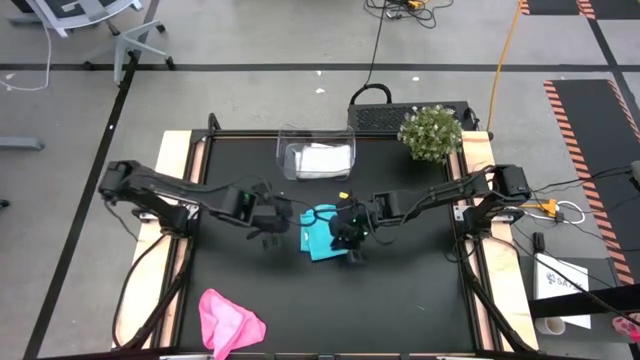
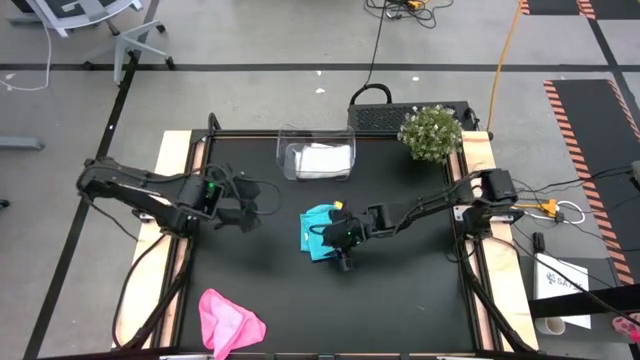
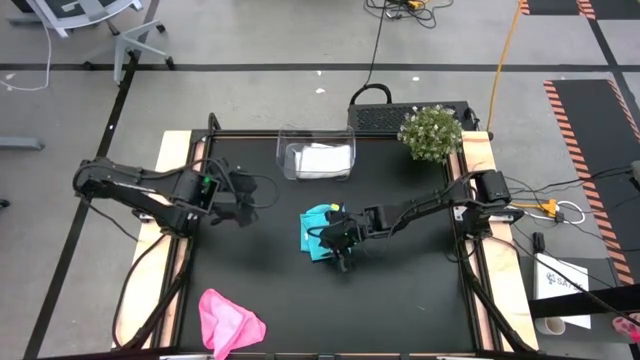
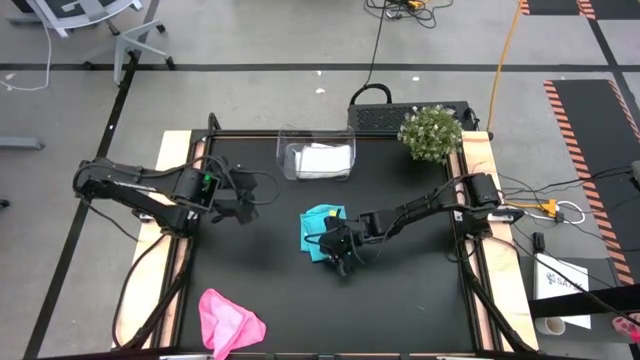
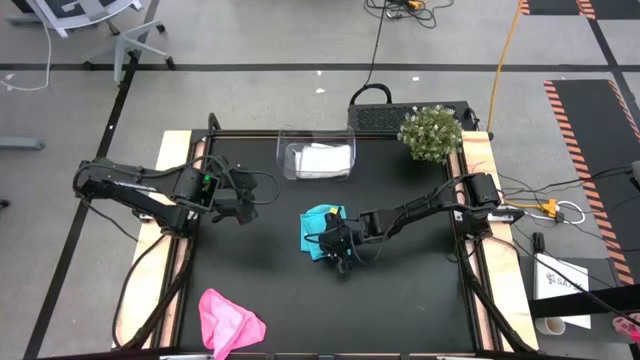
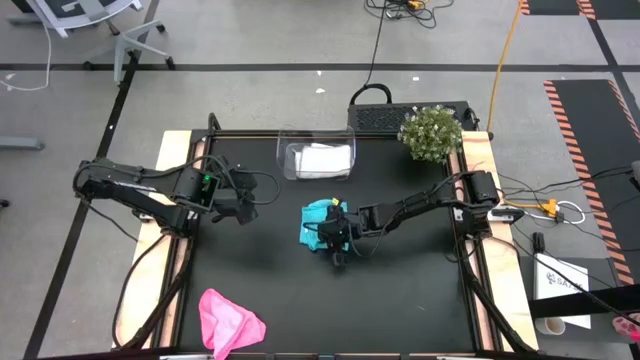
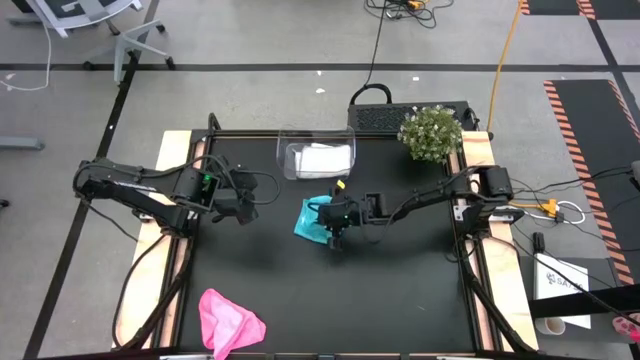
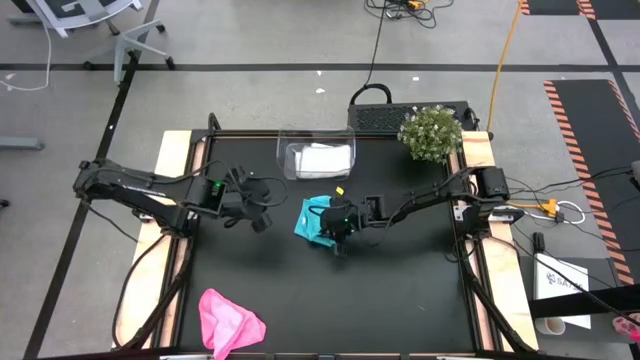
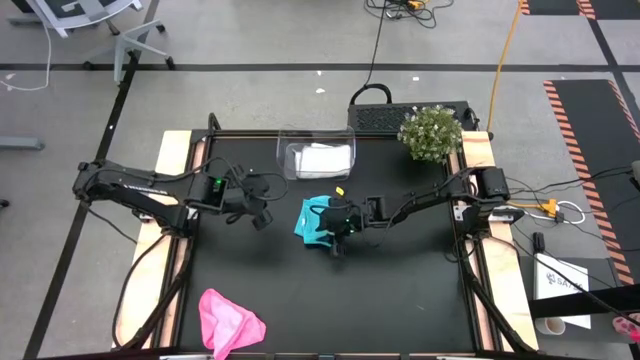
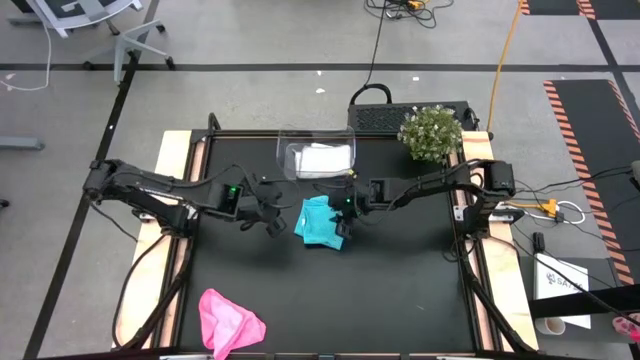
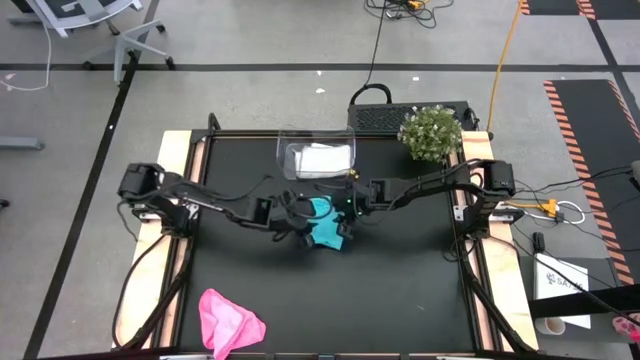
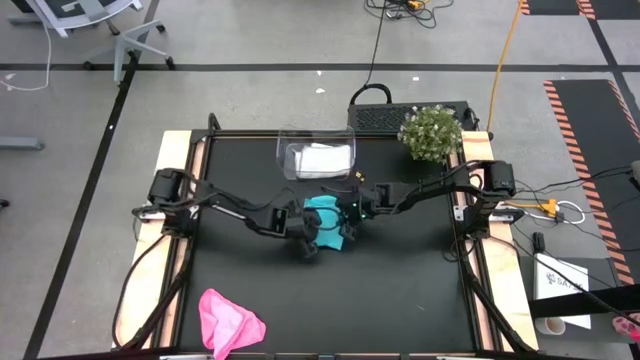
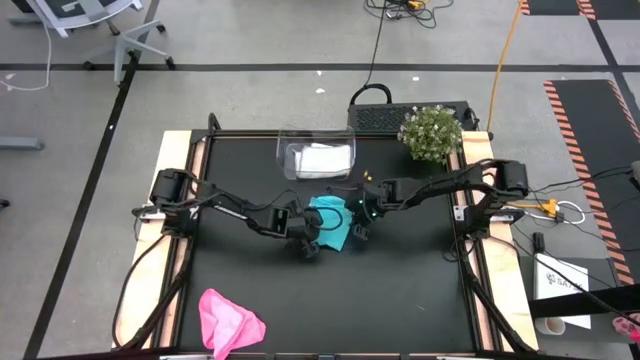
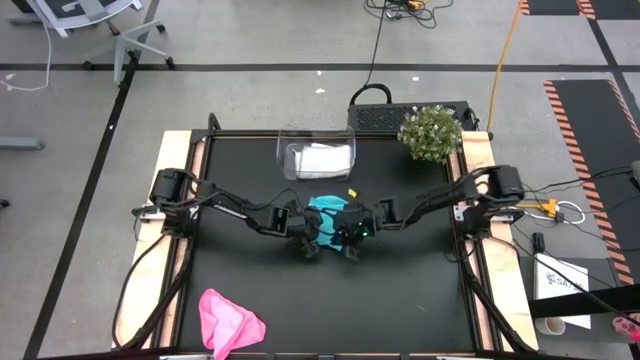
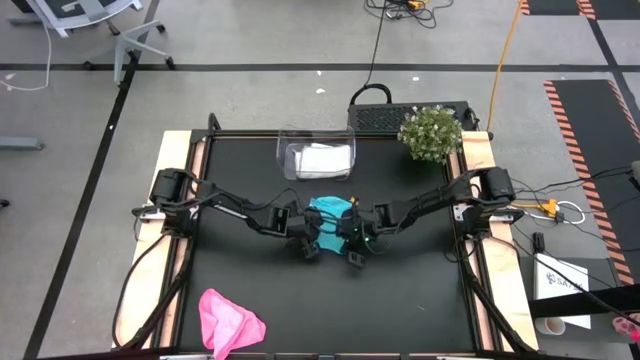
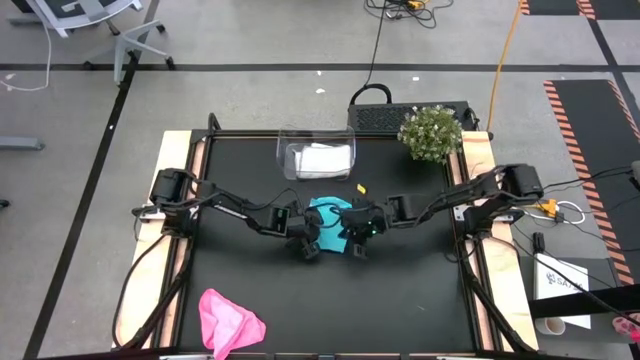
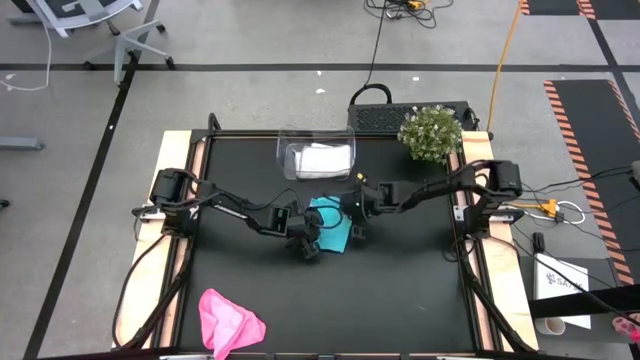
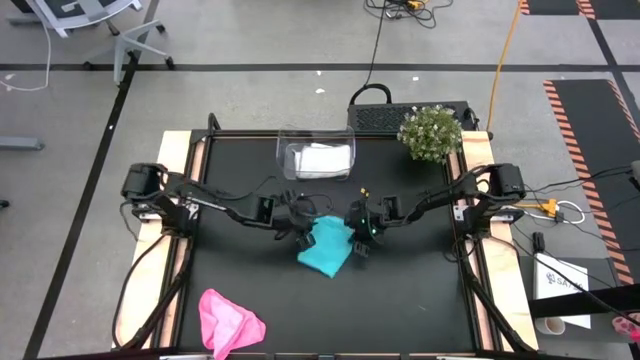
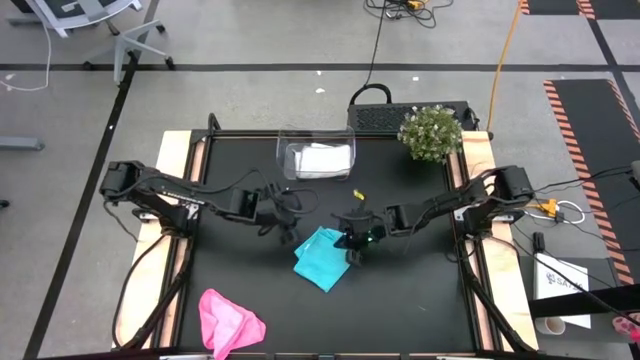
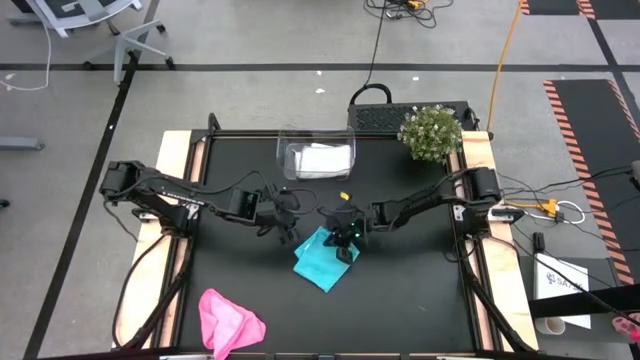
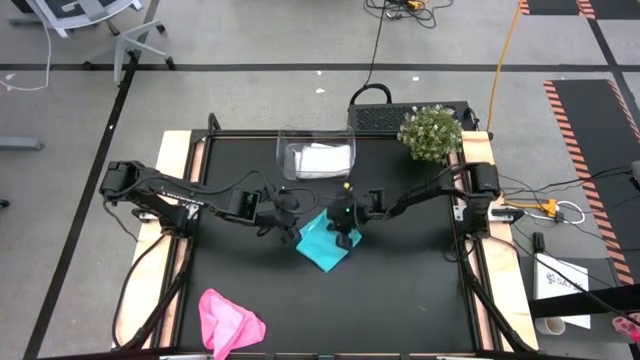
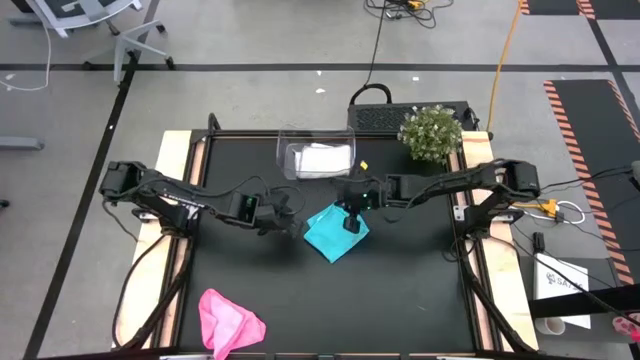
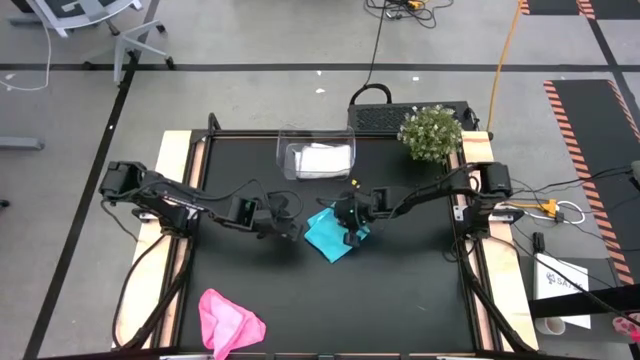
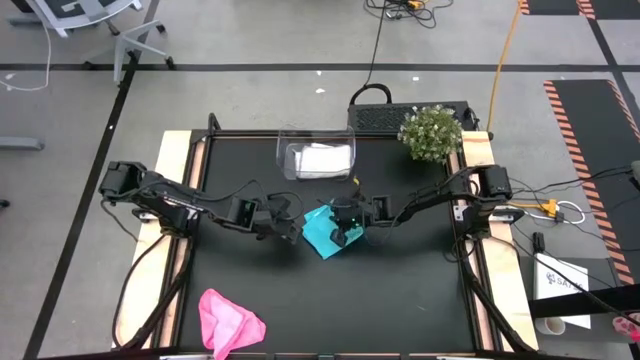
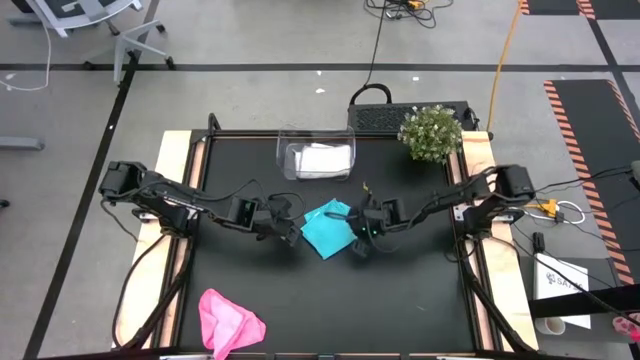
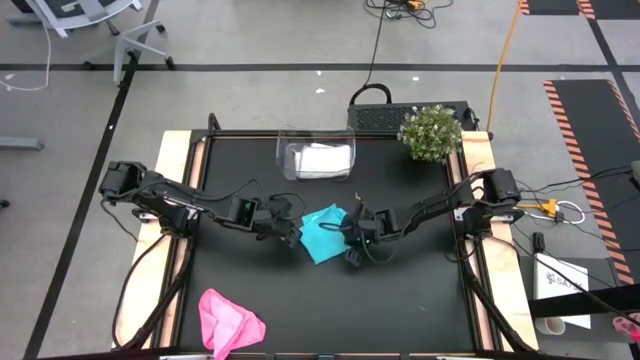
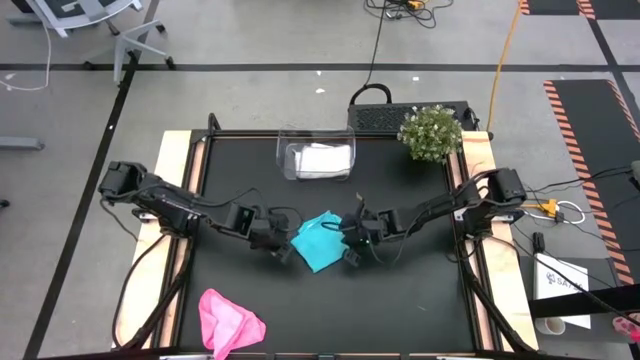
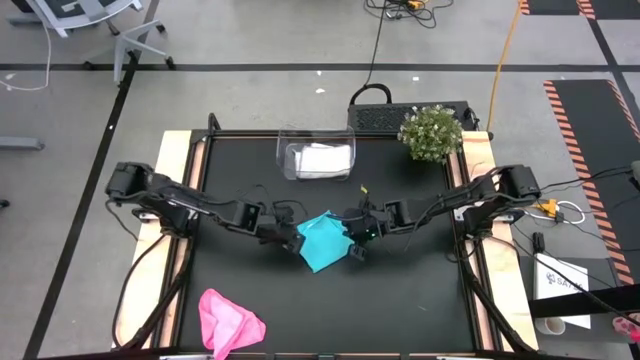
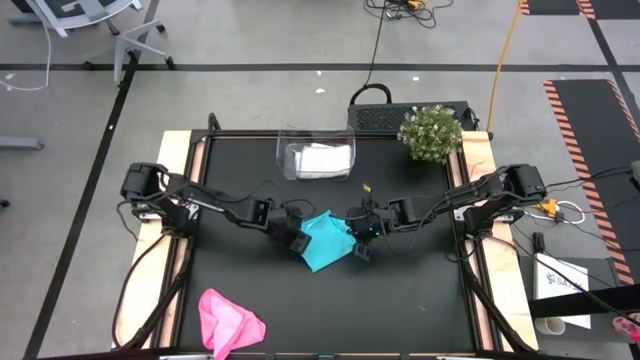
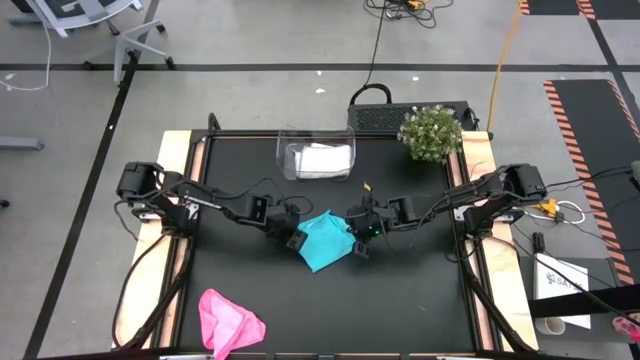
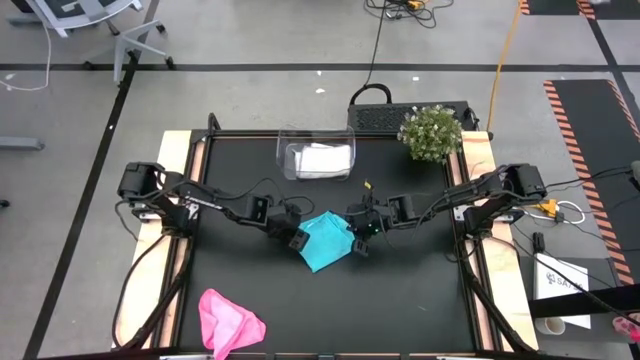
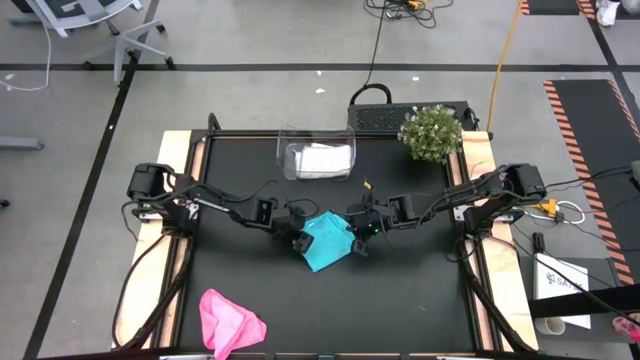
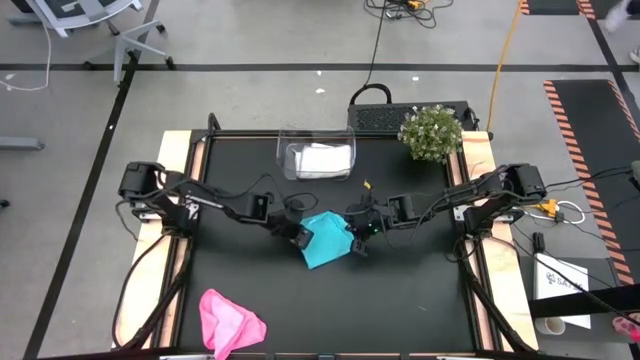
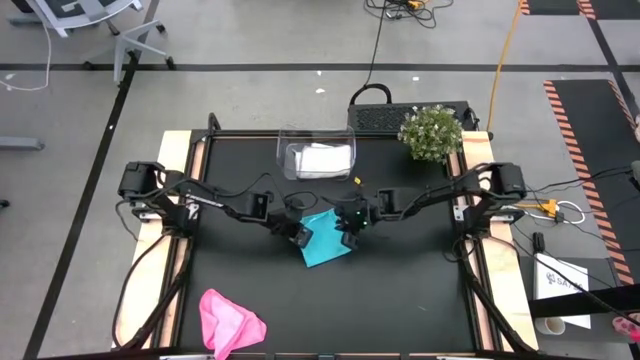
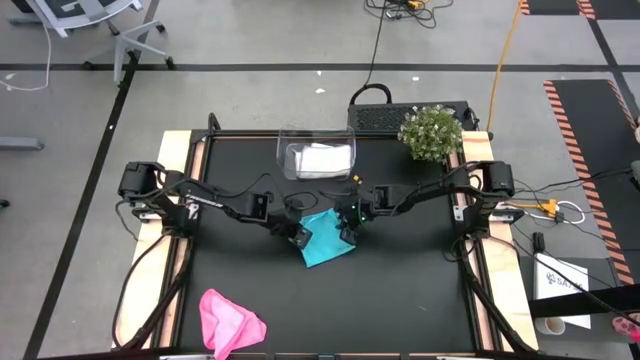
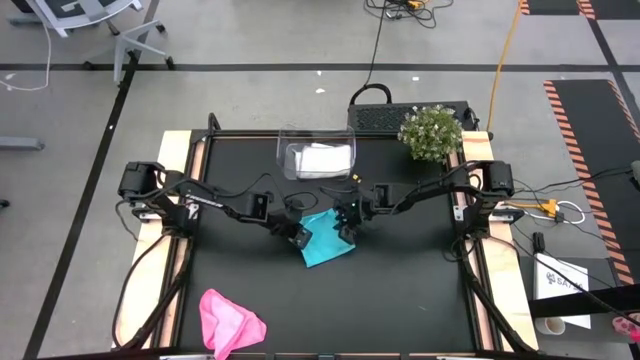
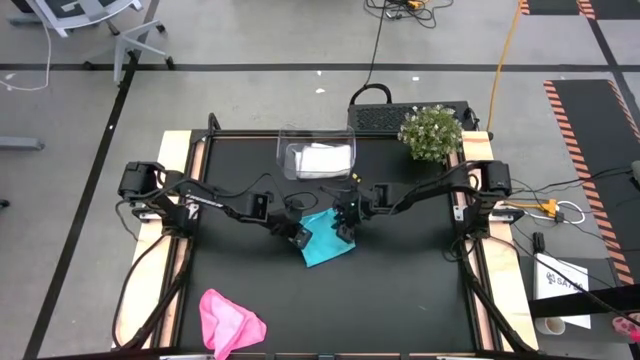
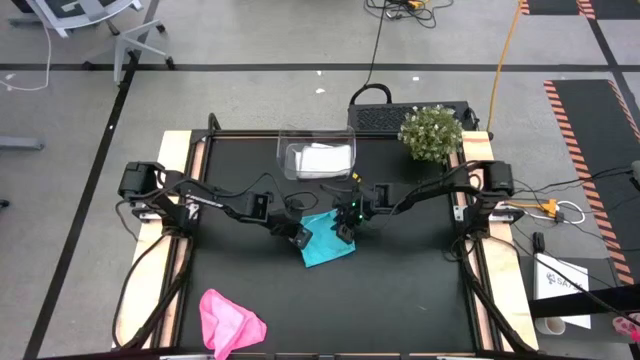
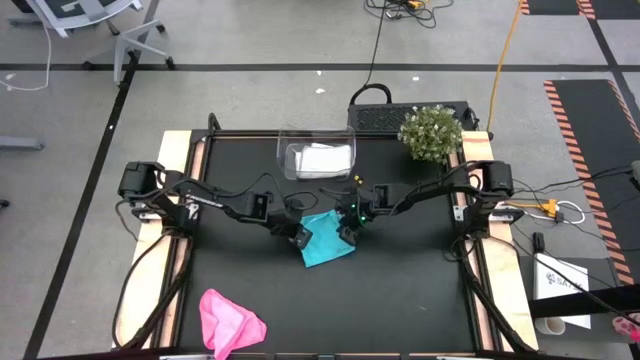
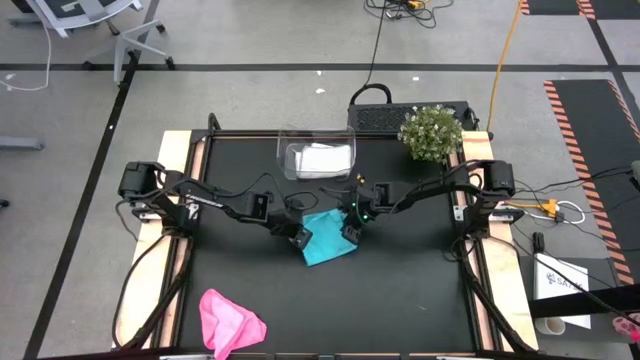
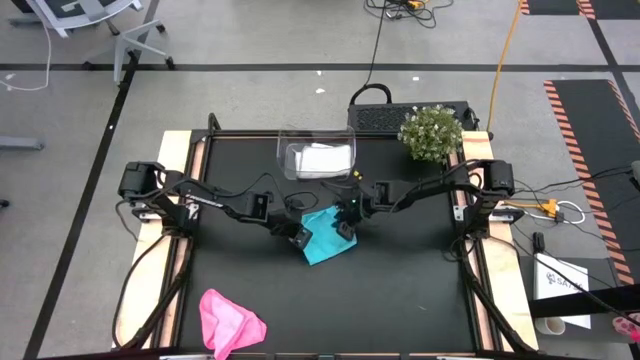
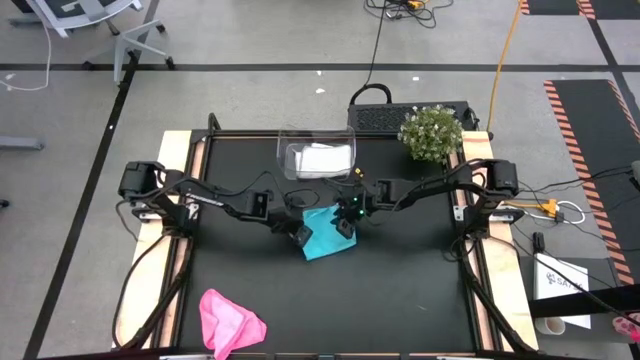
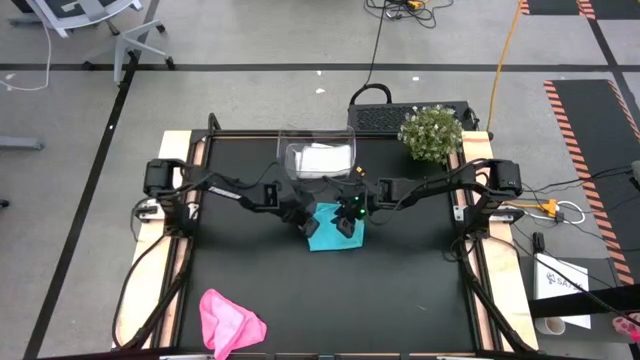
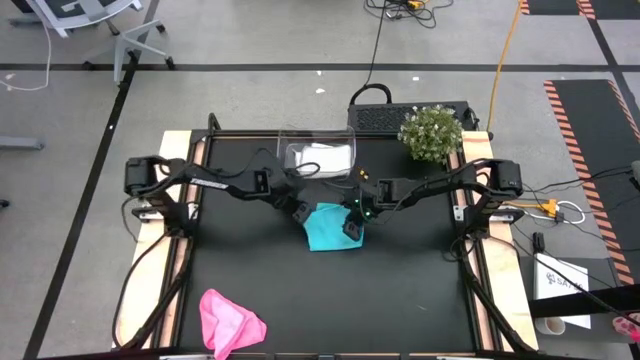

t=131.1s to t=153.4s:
Task: Fold microfiber towels
Fold the blue microfiber towel
